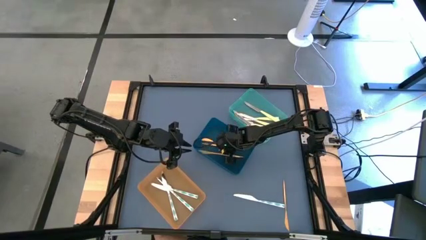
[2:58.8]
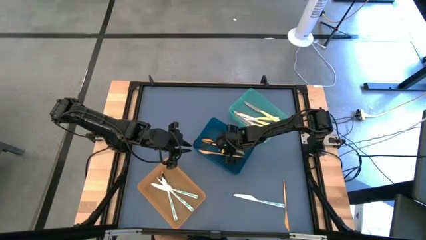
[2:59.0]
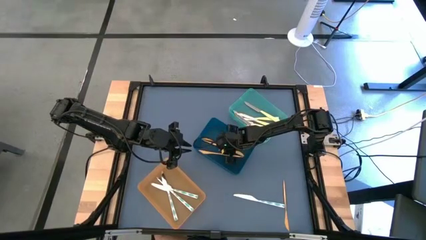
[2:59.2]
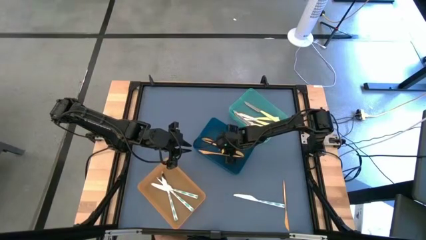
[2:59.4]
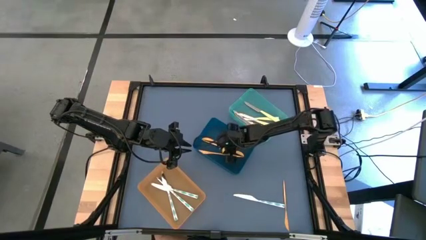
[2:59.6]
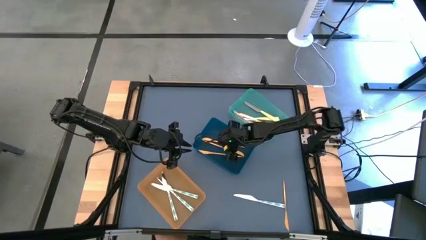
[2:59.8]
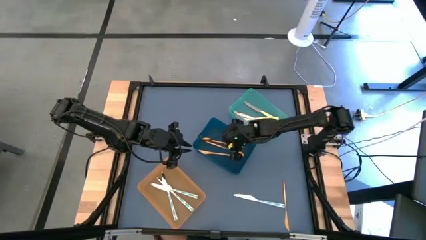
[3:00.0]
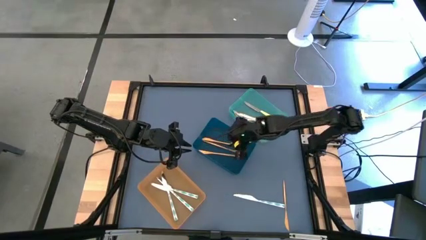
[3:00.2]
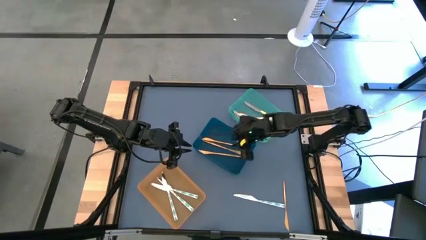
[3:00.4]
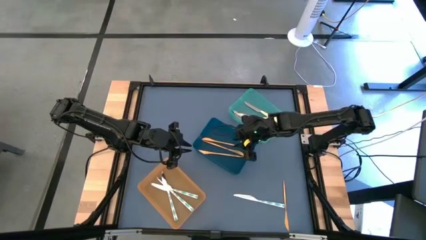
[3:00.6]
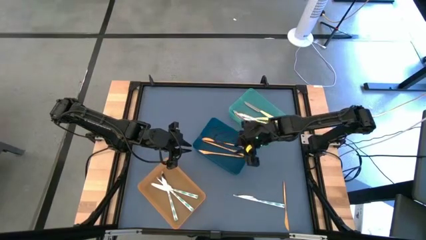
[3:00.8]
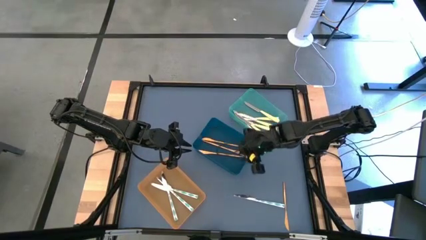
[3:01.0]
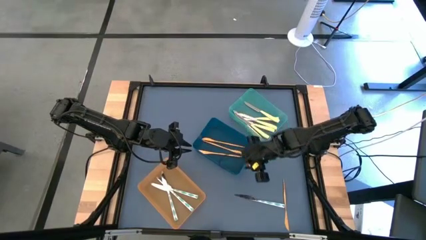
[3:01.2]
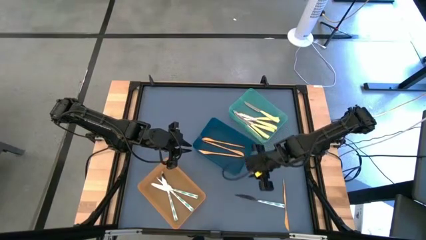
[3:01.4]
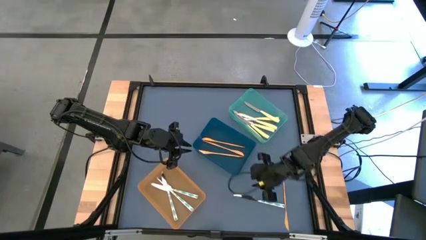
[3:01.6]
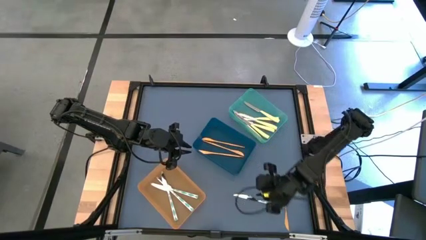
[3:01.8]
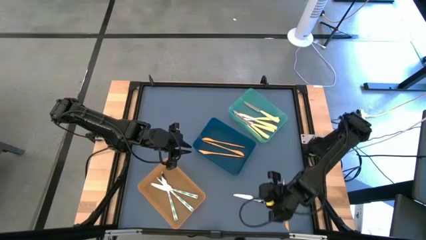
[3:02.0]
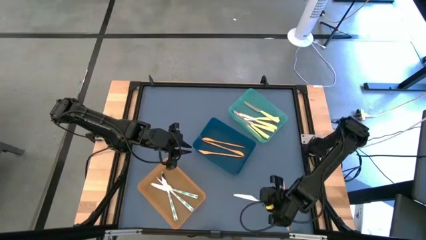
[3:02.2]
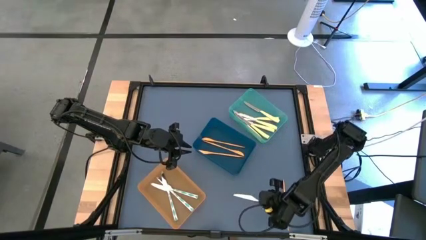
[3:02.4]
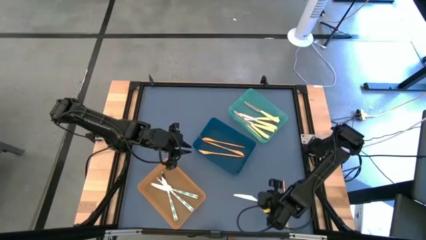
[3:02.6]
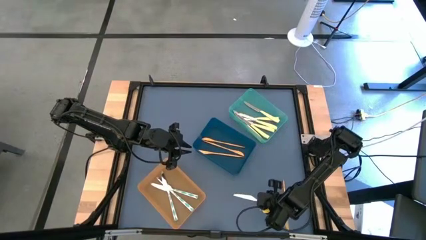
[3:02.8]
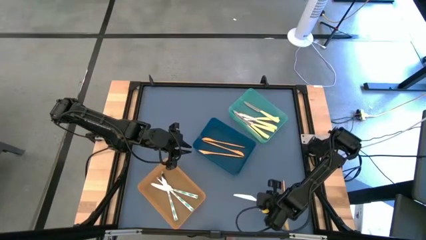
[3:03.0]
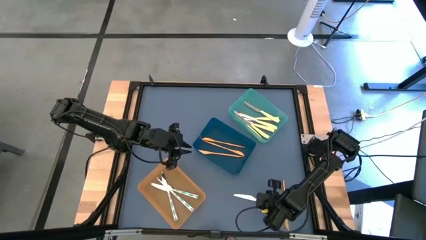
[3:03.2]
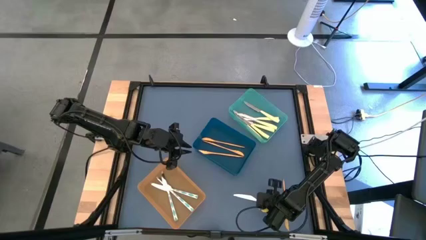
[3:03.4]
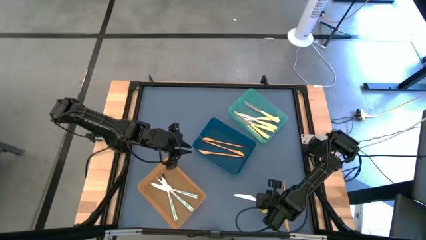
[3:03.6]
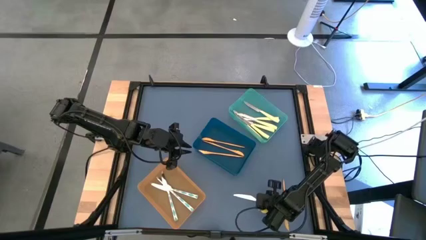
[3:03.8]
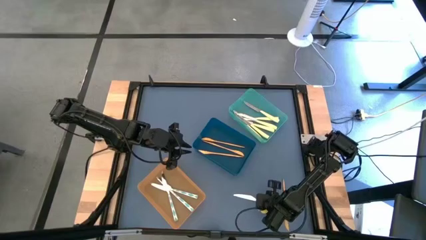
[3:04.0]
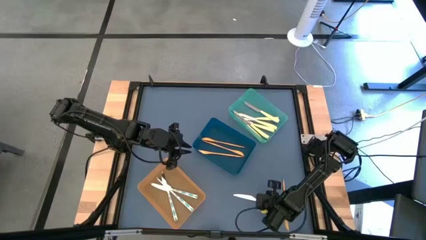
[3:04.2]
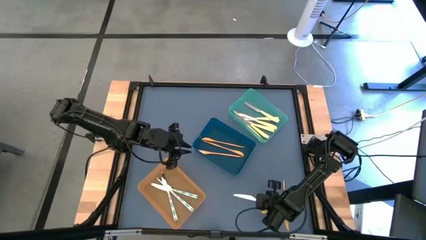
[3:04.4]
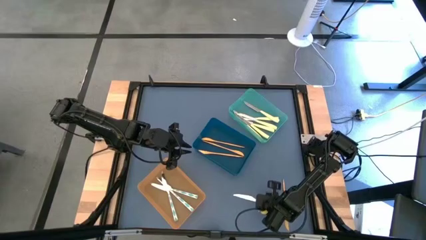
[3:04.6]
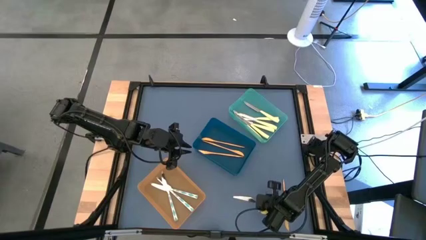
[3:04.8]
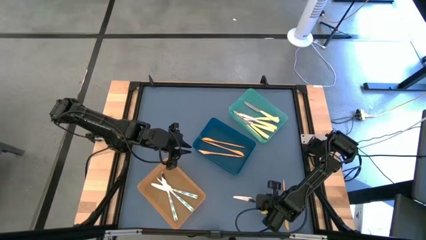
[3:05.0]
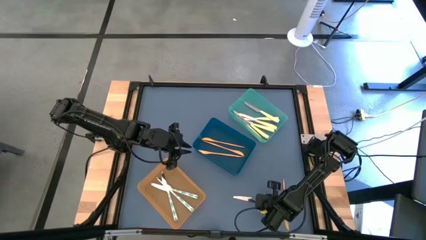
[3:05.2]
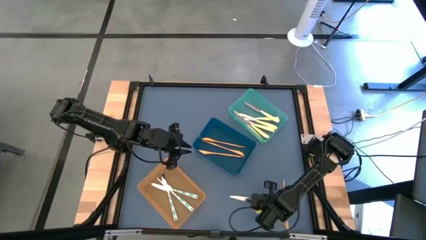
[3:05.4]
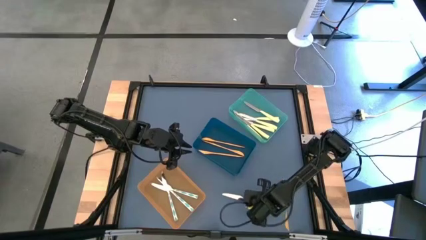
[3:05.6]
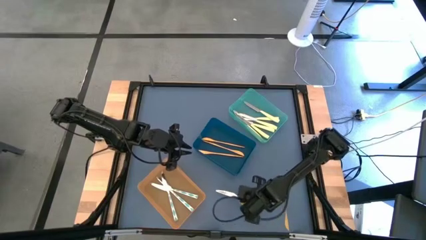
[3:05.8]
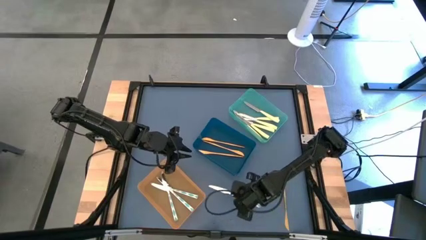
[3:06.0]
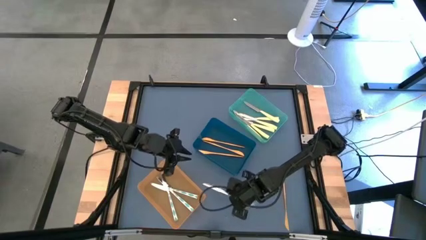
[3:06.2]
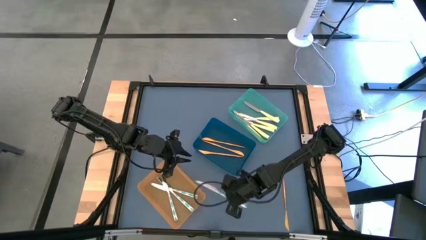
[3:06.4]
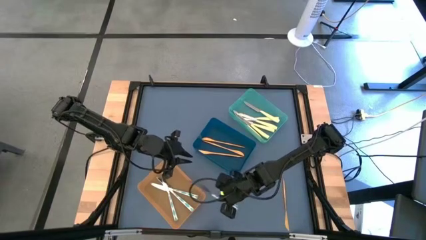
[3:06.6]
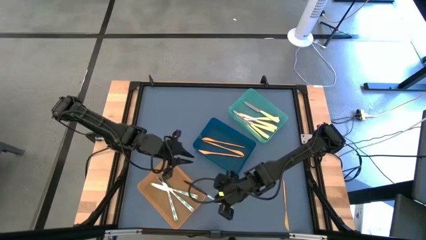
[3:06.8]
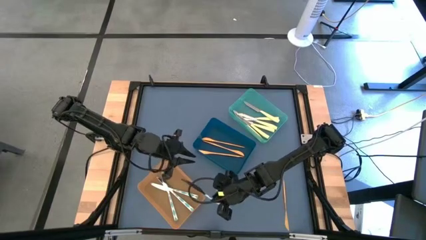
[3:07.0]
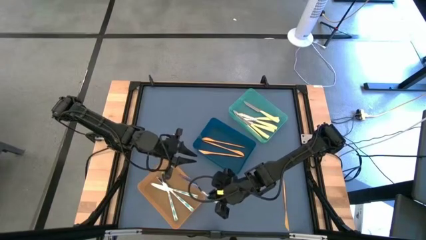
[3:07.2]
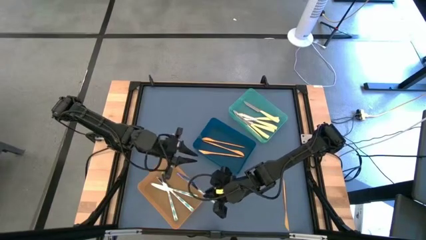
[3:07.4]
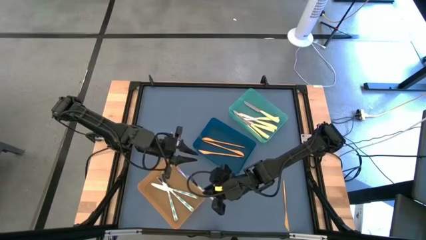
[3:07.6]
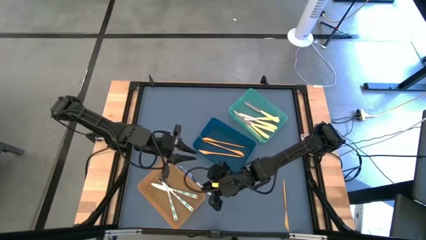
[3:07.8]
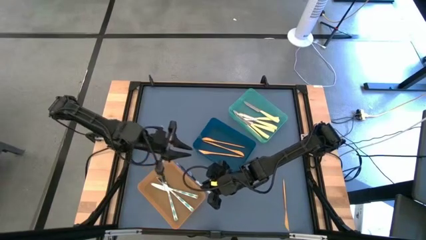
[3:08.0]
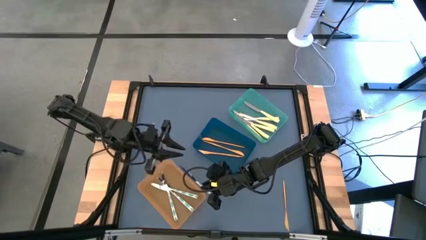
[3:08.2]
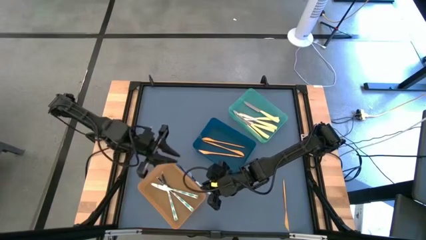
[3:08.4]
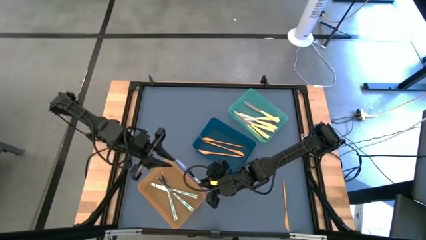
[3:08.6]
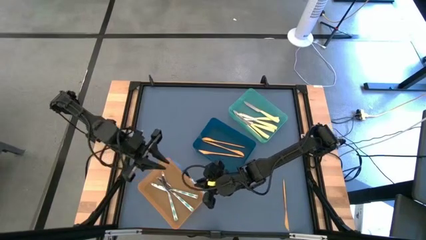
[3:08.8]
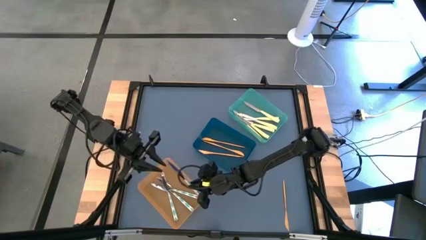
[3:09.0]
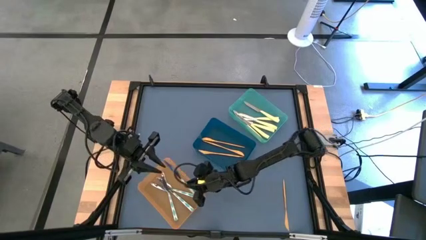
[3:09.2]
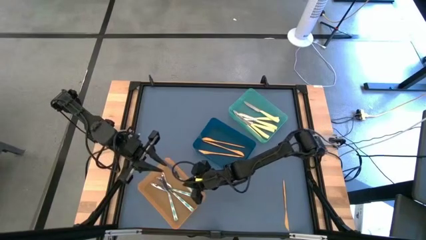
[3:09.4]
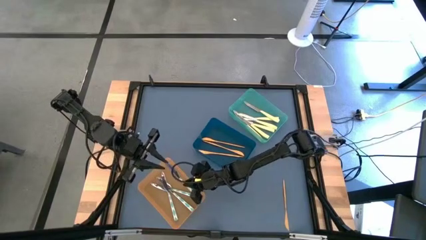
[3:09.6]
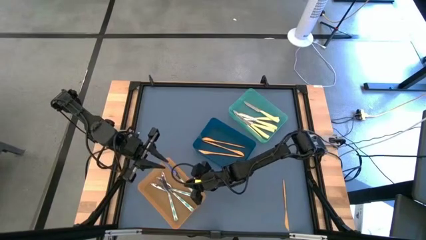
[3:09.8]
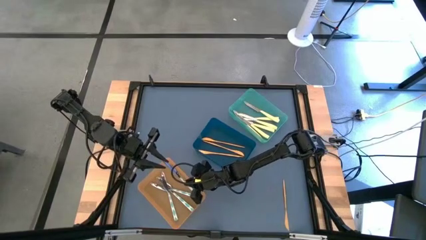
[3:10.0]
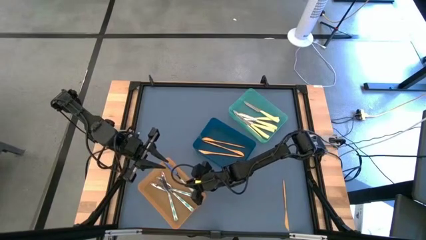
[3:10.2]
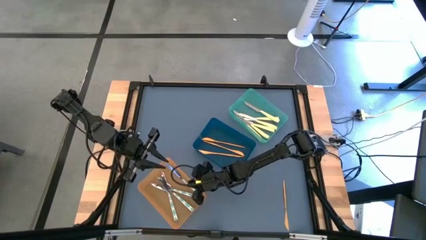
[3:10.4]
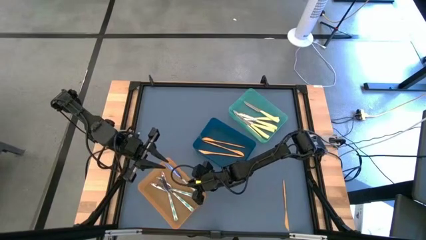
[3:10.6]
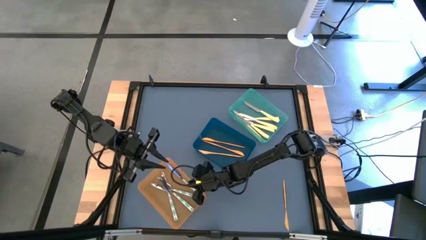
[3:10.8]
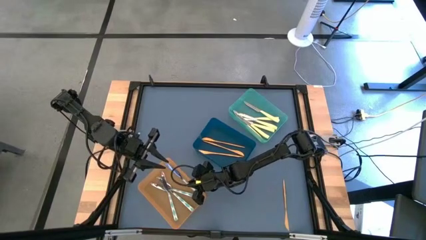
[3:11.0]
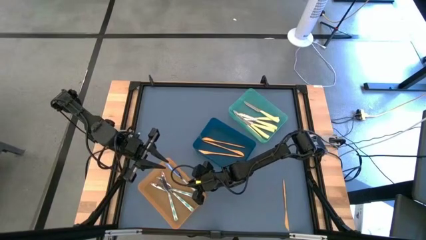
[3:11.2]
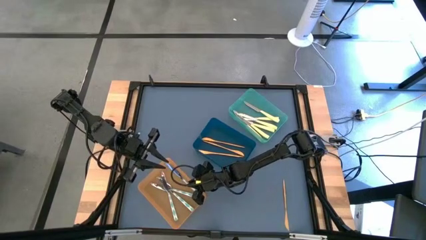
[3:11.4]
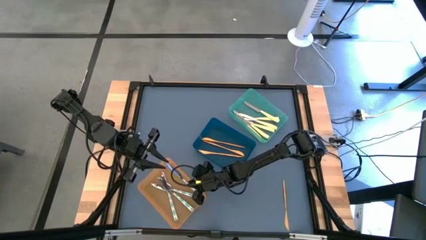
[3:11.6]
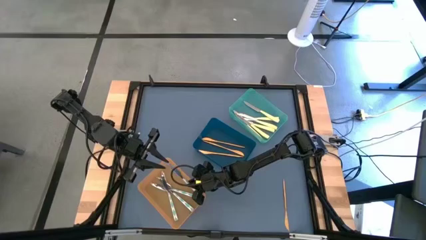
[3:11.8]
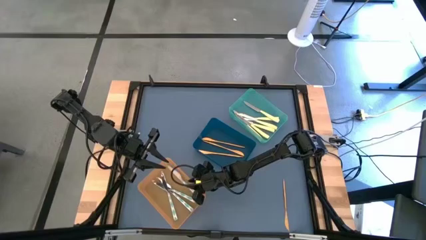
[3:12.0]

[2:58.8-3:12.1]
Task: Sort silverware by color (type)
Put the blue knife into the orange bin

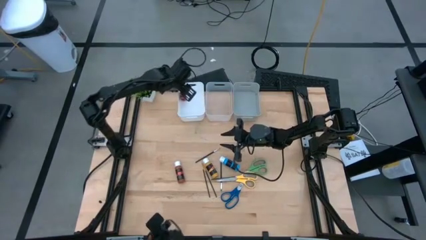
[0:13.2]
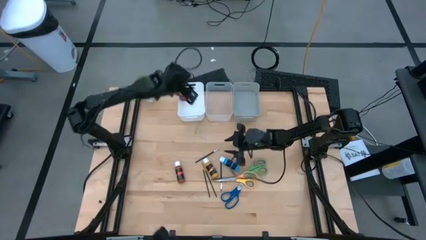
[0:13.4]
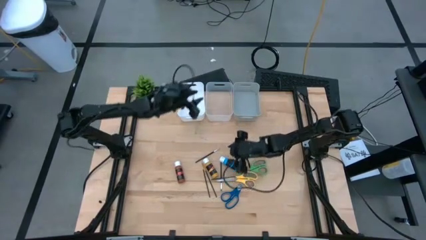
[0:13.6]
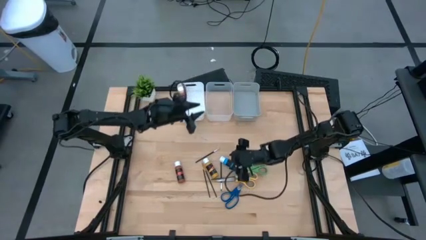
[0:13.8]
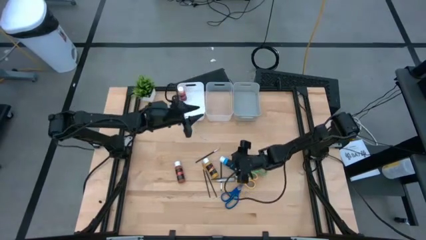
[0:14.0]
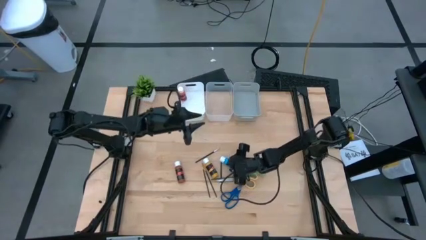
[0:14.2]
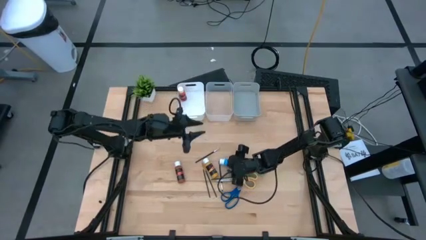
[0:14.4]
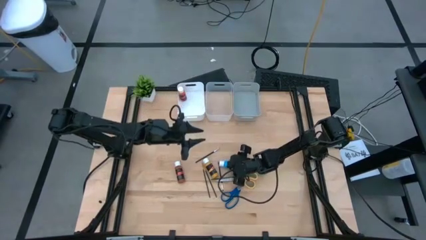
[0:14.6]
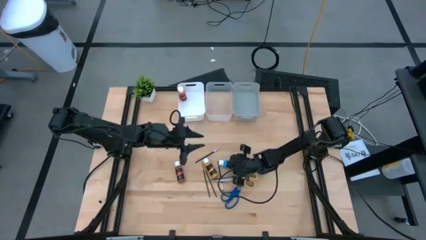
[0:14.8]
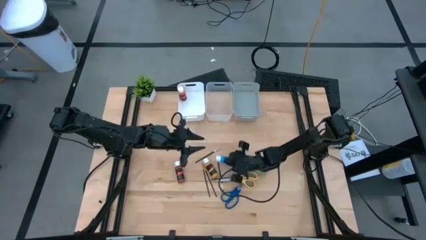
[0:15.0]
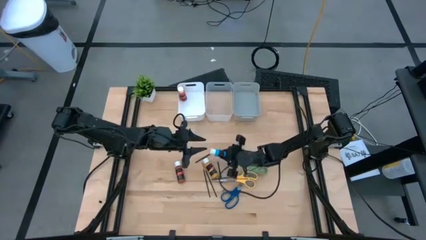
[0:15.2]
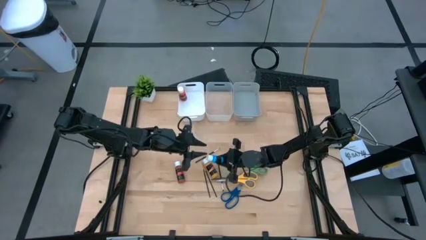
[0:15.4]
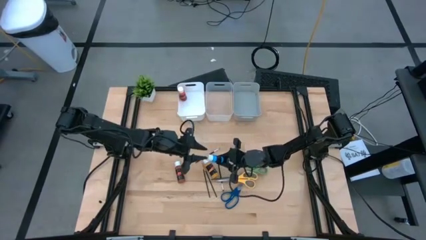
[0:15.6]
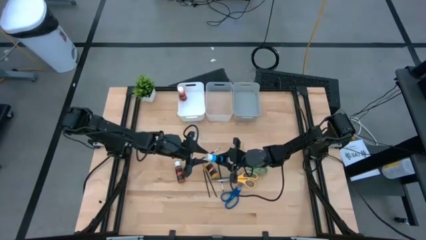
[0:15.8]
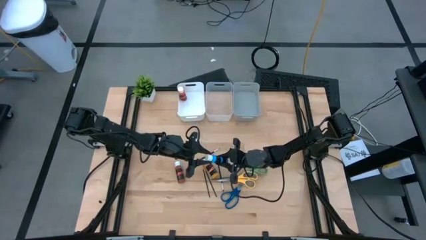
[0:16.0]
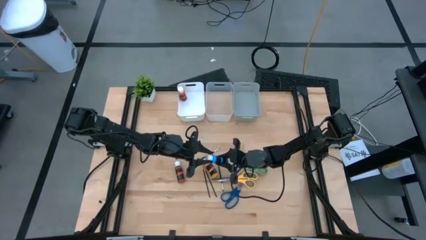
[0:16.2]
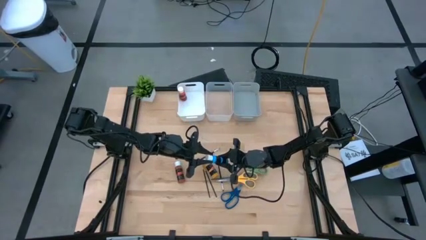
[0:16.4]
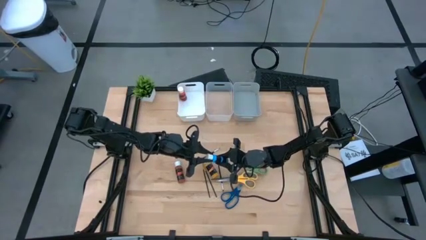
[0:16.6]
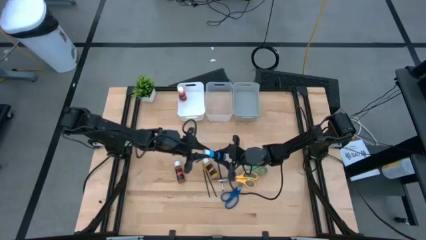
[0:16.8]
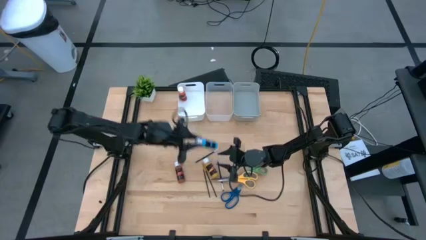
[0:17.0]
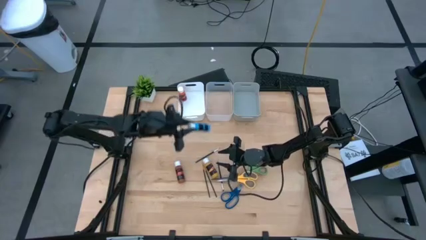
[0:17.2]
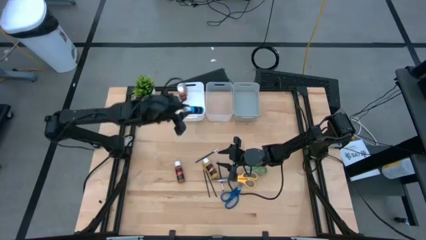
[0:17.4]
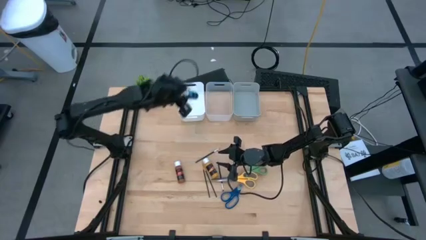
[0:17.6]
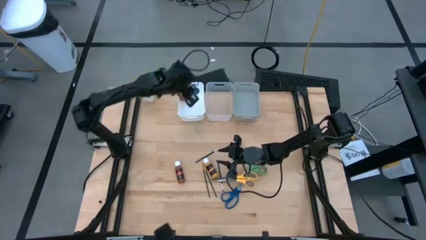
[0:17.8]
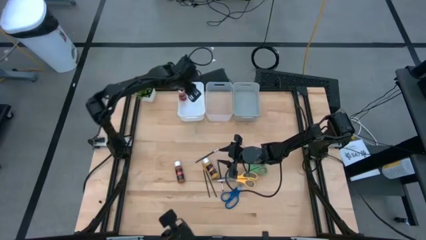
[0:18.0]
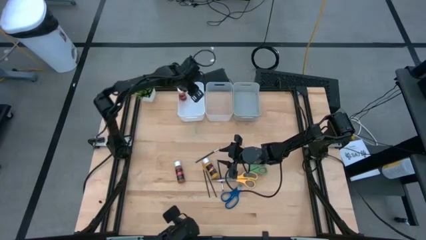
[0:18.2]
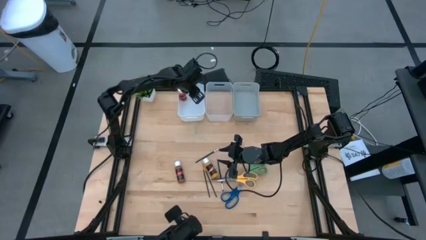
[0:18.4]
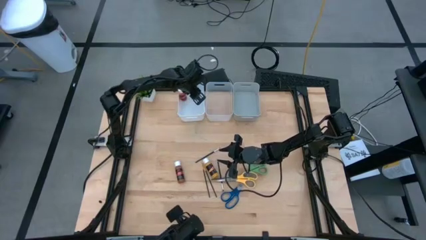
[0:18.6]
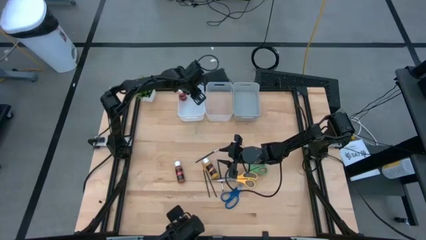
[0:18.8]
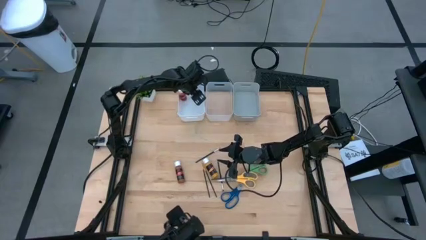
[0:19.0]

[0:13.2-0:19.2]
Task: Pick & Place Paint Supplies
Put the blue paint bottle into the white bin
